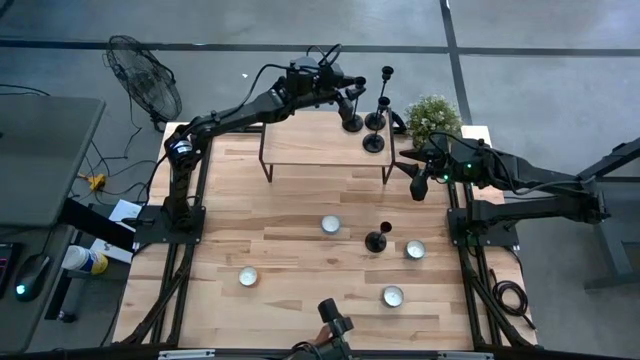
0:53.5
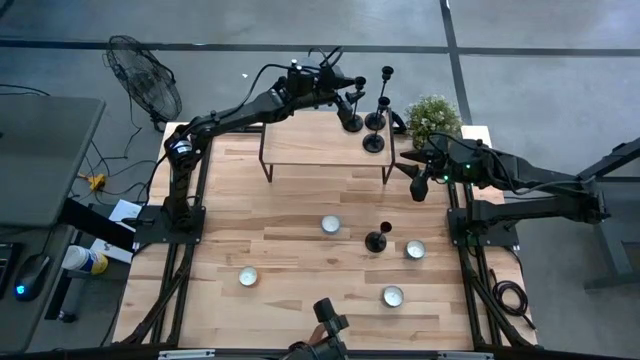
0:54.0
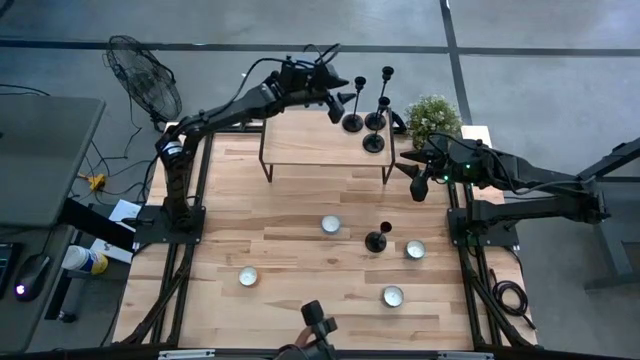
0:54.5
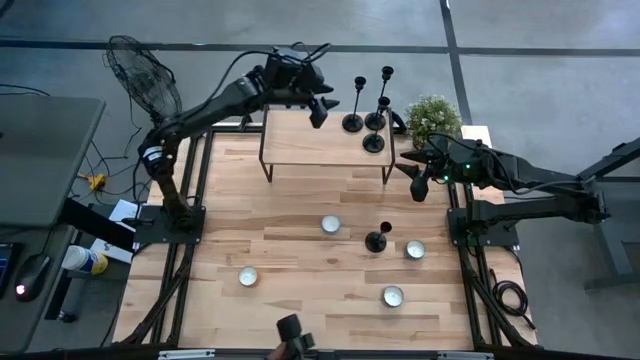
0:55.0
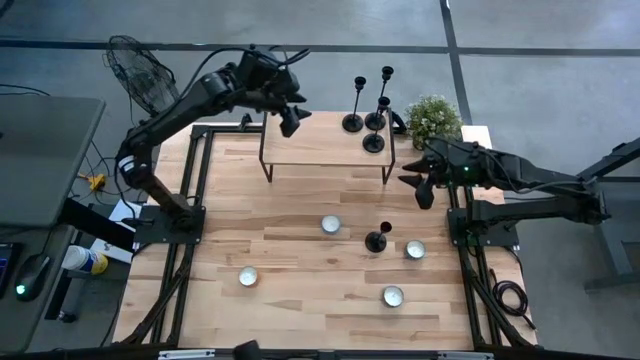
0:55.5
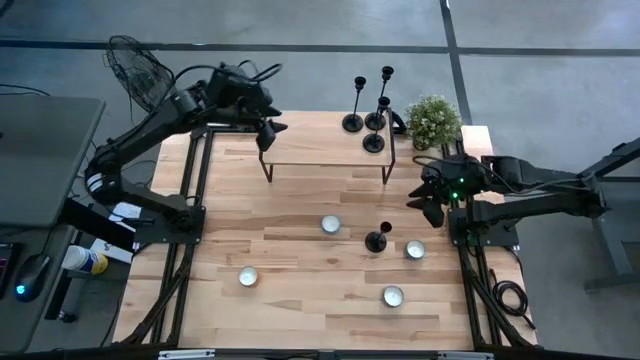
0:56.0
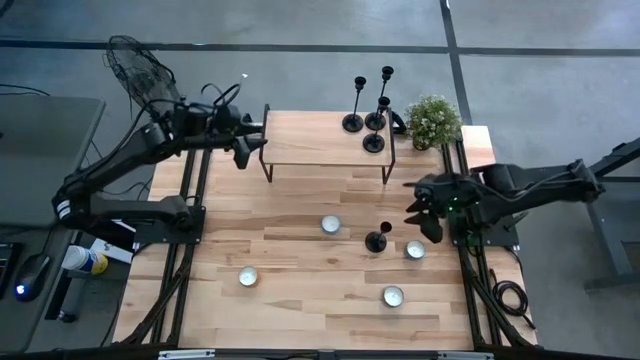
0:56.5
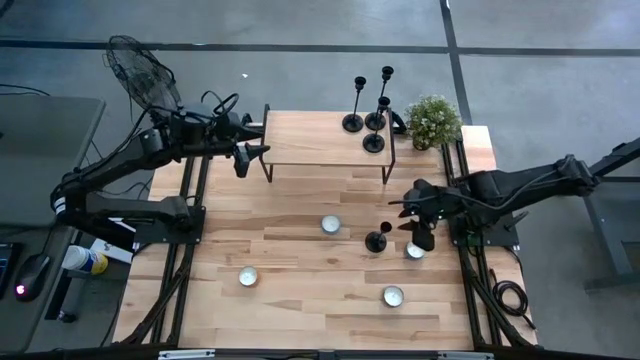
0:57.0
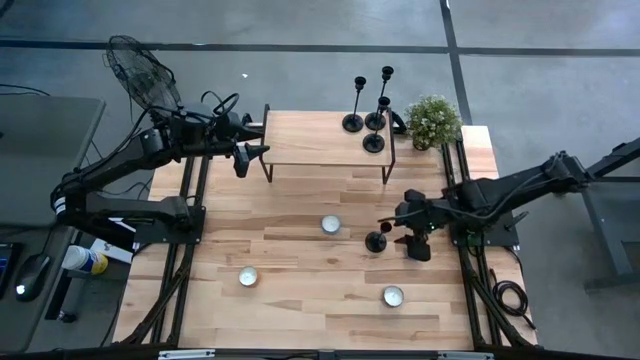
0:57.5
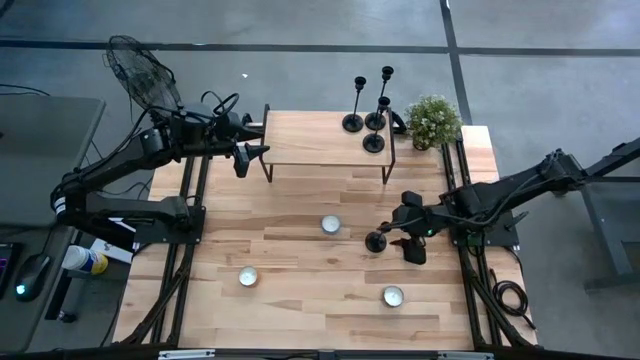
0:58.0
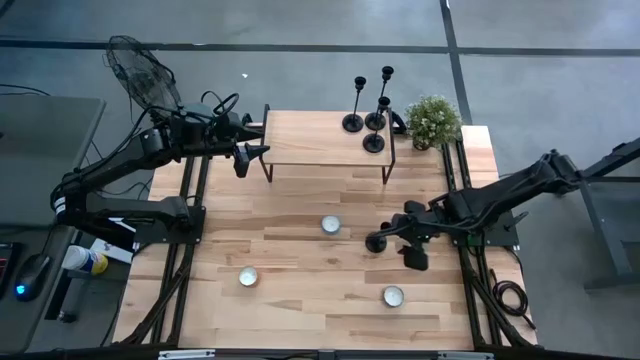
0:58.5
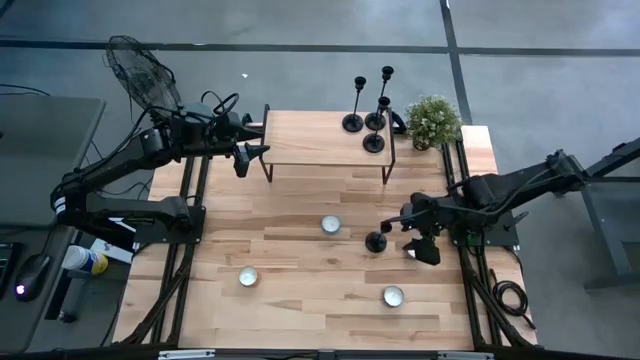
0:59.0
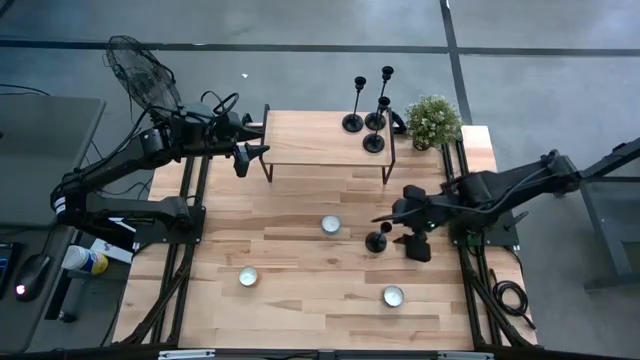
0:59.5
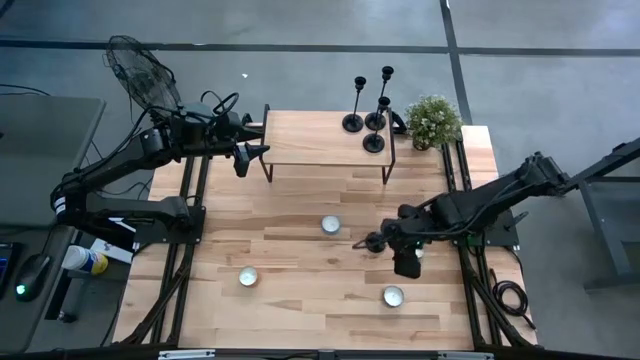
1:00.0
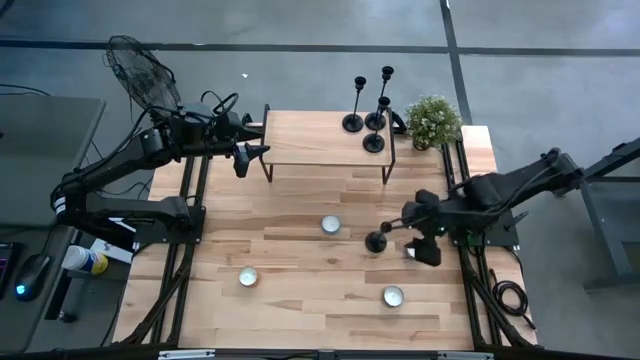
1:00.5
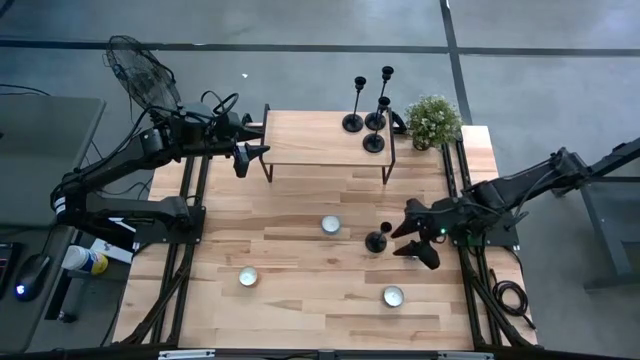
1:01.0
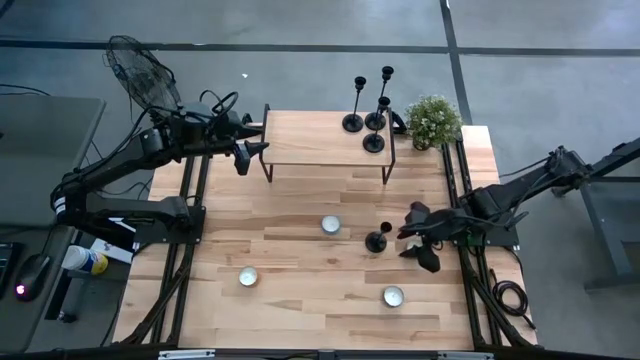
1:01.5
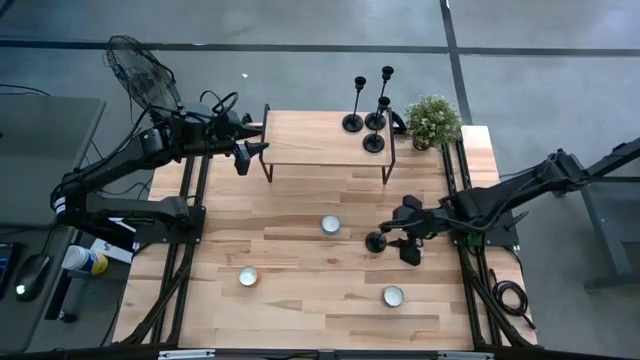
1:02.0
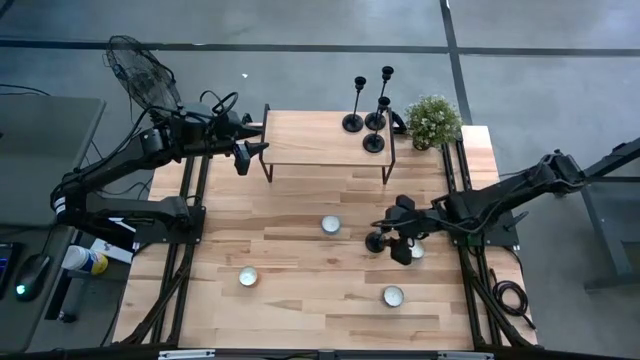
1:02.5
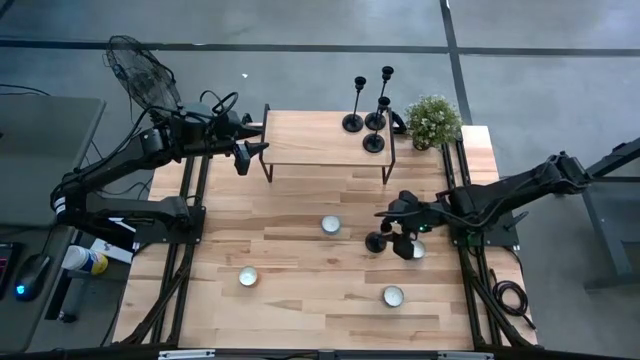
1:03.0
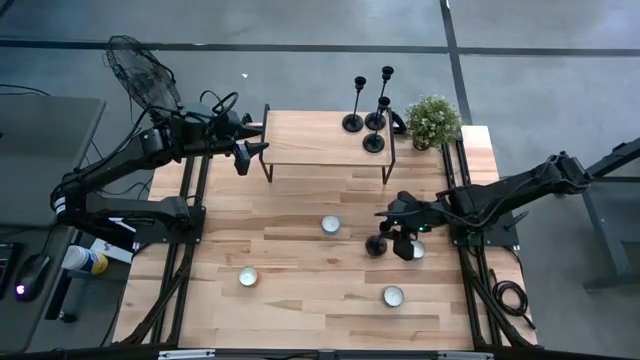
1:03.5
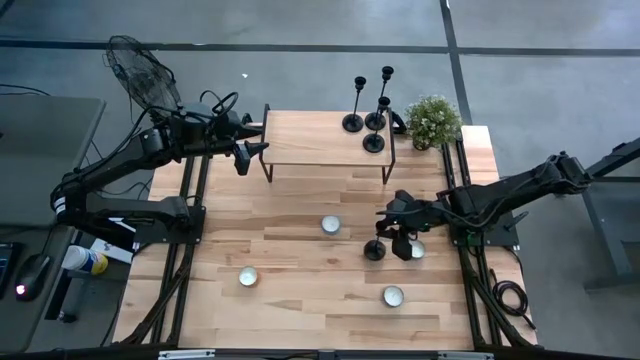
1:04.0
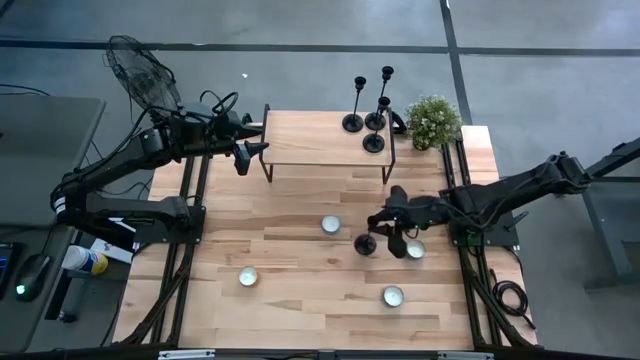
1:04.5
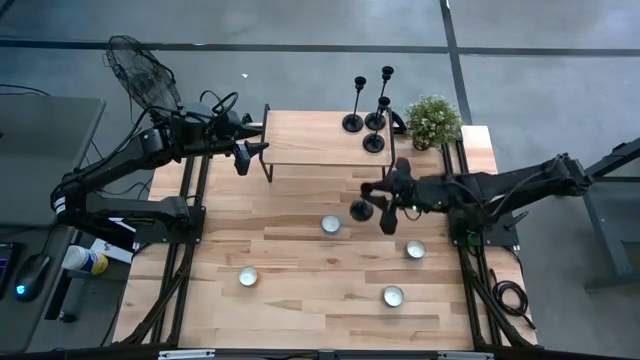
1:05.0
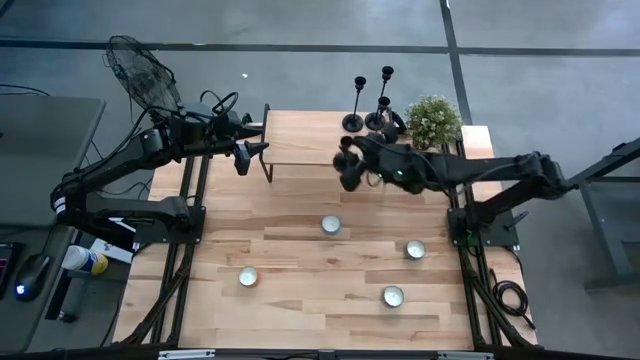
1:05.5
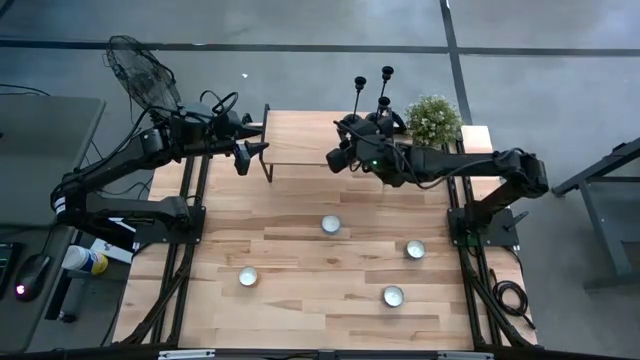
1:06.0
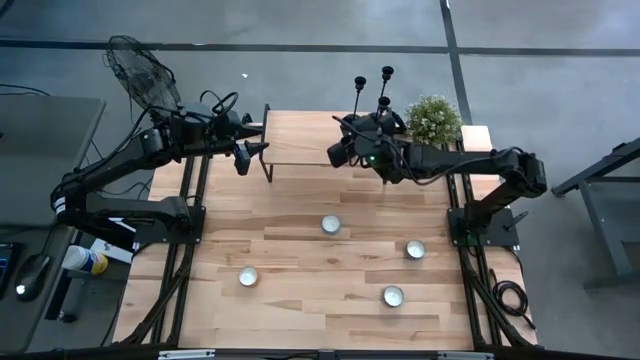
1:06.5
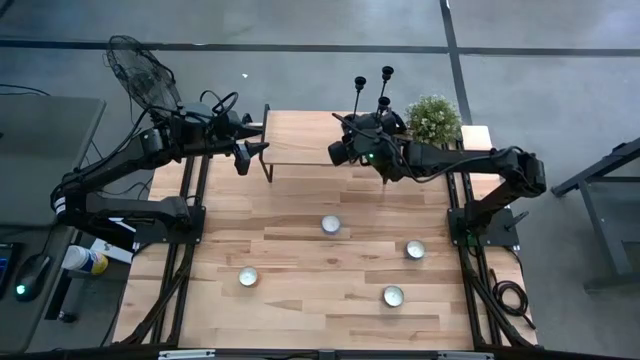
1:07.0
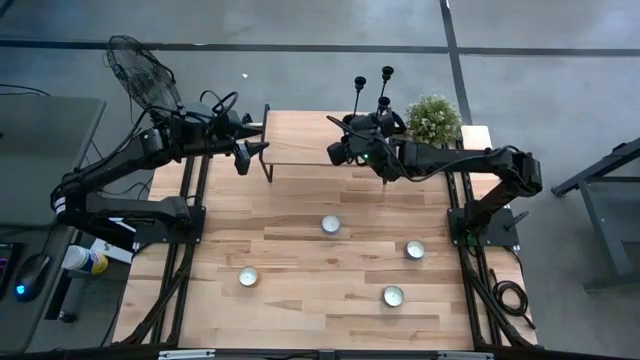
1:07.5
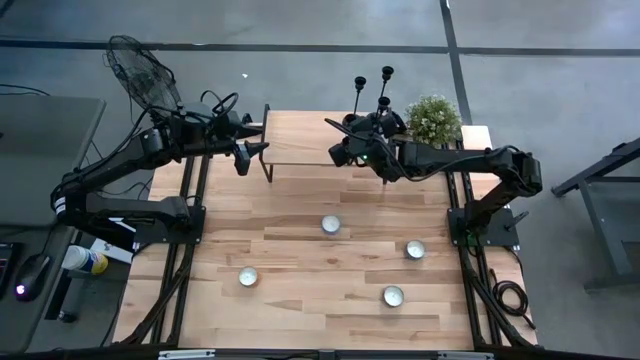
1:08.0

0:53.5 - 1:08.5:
Task: Pick & Place candle stick holders
Put the black candle holder on the shelf

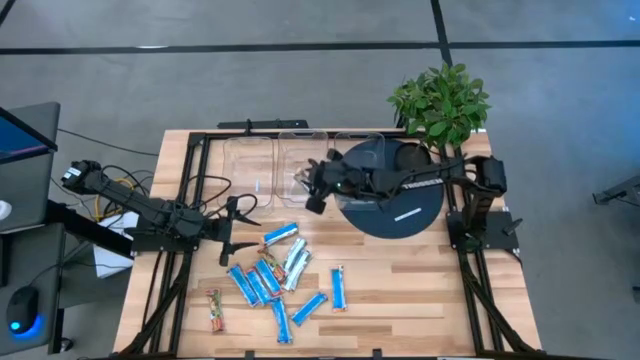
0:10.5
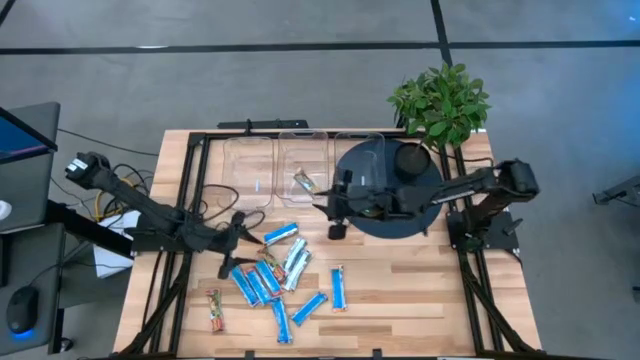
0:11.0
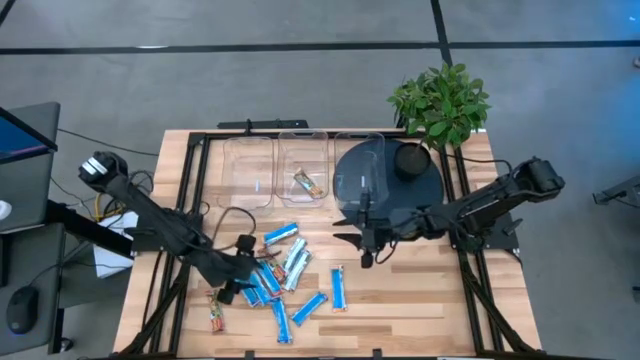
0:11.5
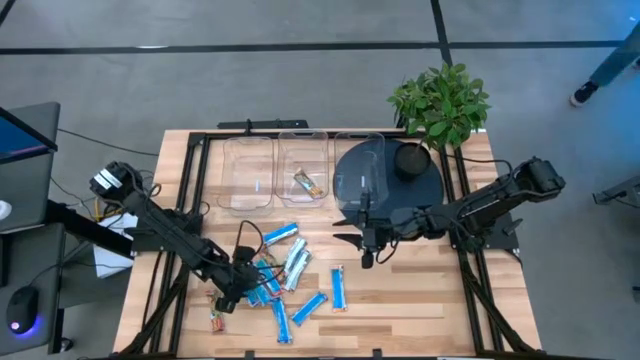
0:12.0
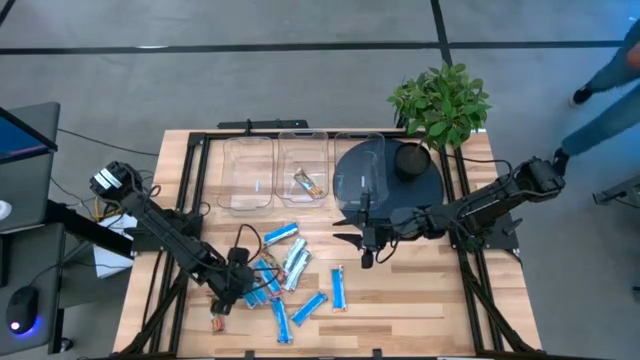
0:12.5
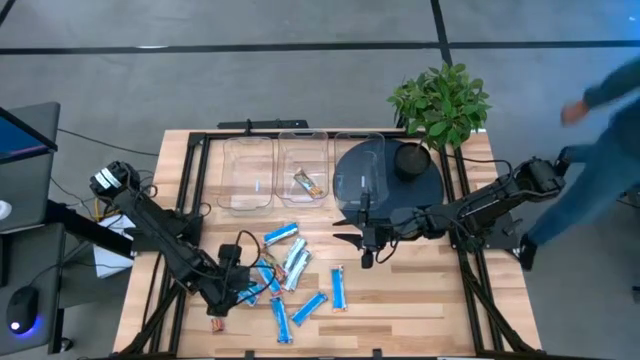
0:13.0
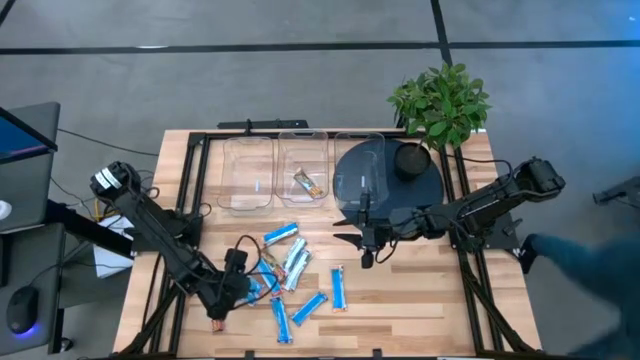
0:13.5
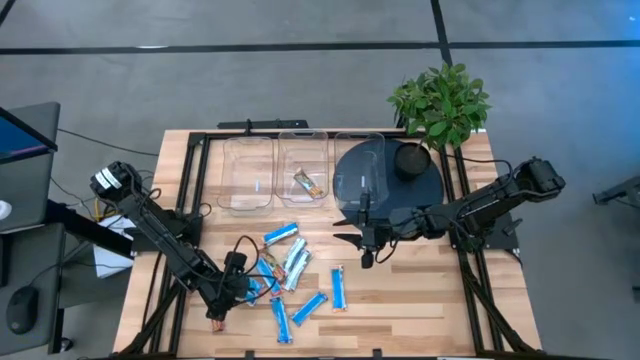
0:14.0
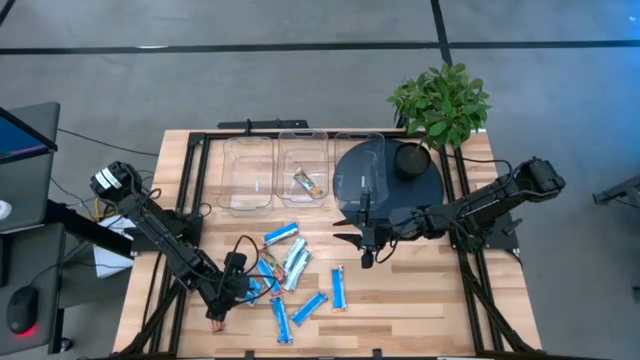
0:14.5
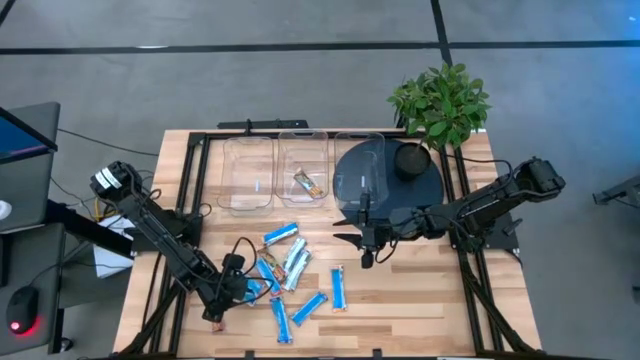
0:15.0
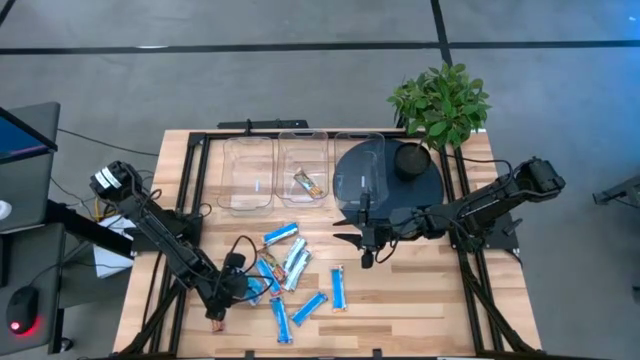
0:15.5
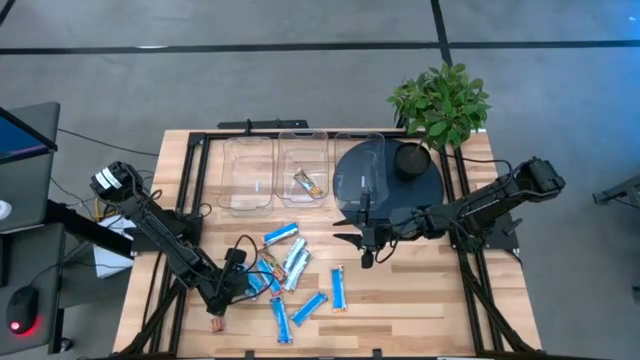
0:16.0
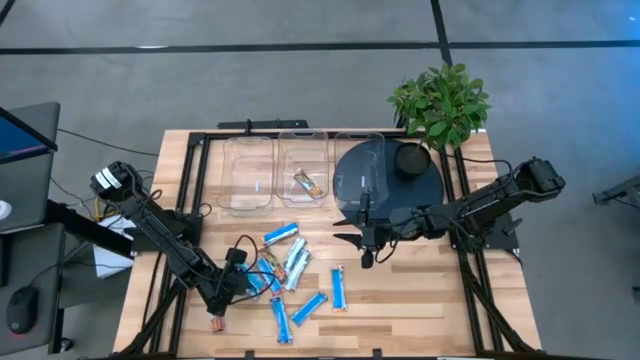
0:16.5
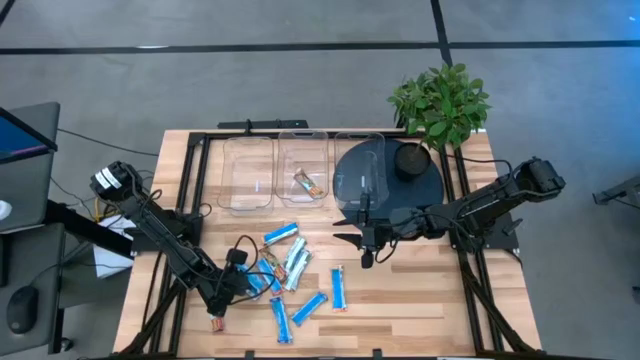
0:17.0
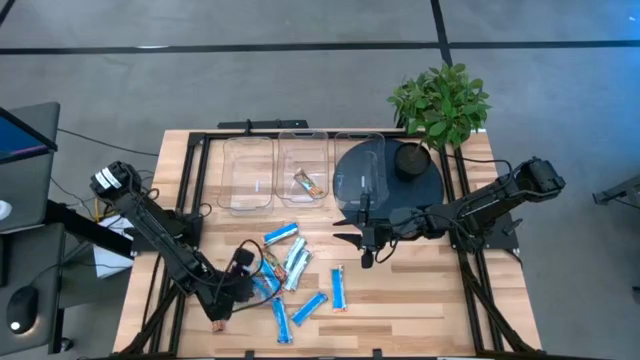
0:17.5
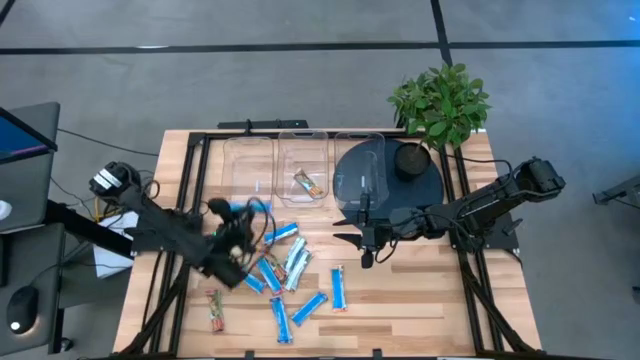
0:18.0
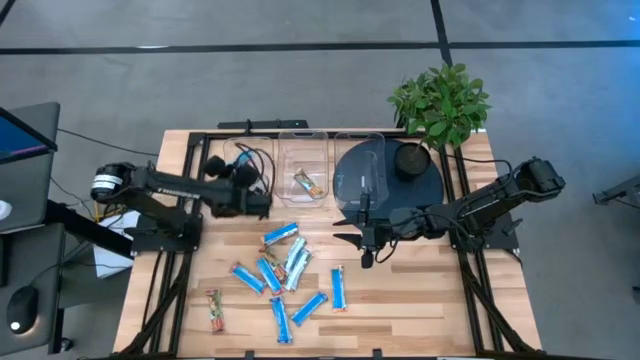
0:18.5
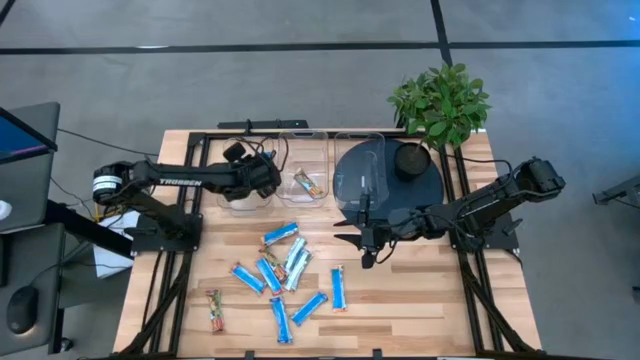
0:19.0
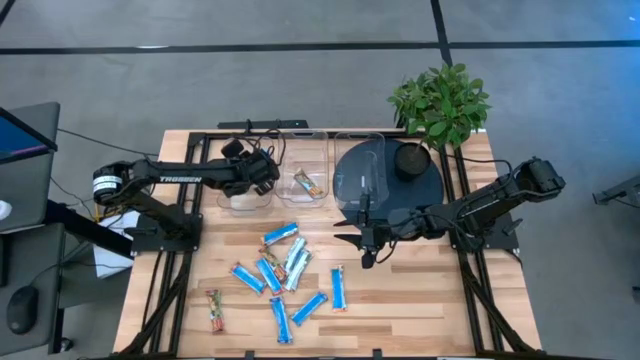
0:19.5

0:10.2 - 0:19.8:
Task: Pick and place Granola Bars by type
Put the blue granola bar into the left transparent bin
